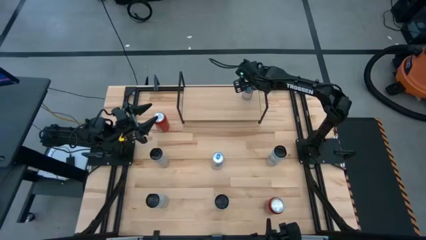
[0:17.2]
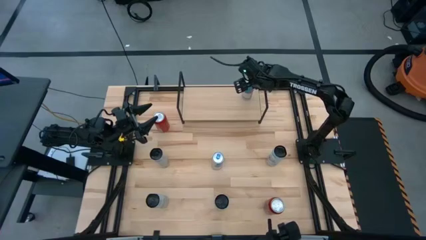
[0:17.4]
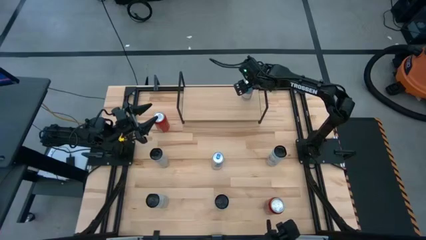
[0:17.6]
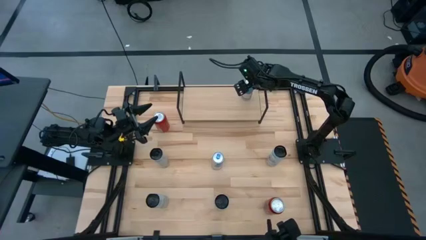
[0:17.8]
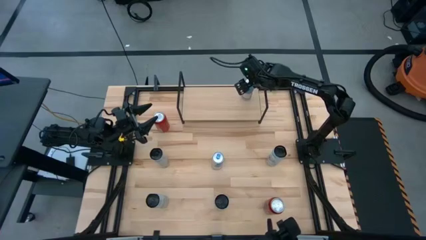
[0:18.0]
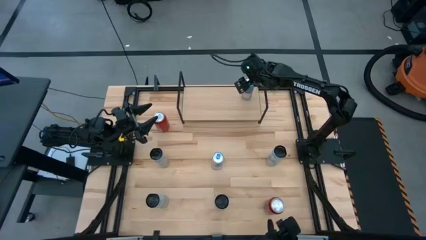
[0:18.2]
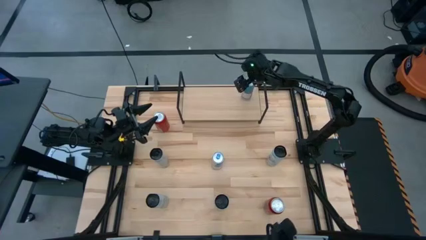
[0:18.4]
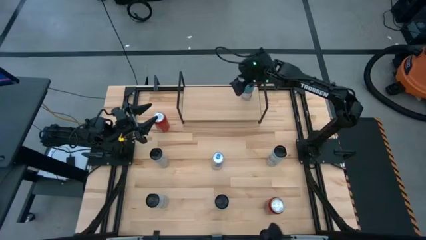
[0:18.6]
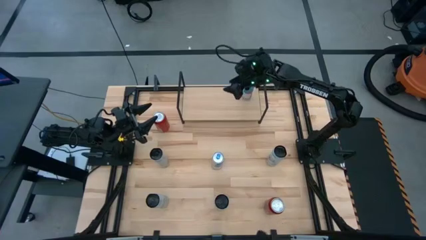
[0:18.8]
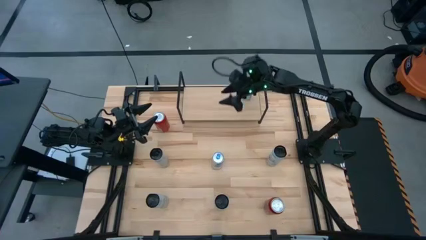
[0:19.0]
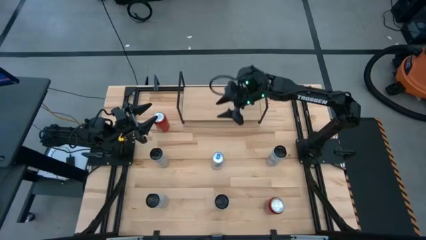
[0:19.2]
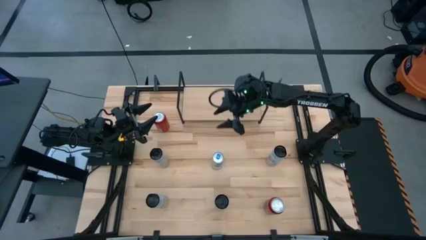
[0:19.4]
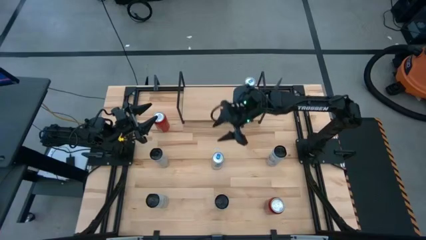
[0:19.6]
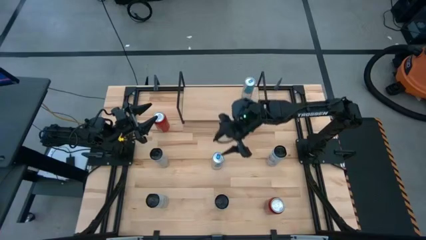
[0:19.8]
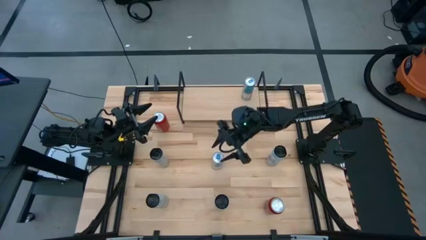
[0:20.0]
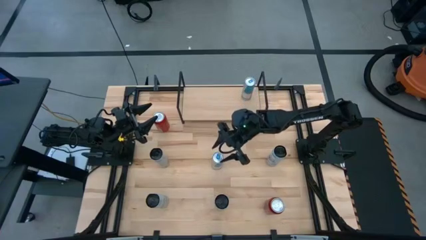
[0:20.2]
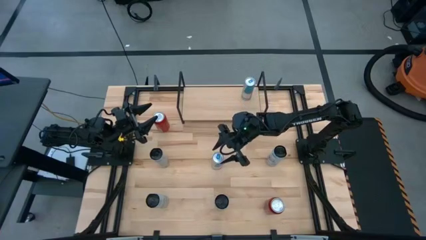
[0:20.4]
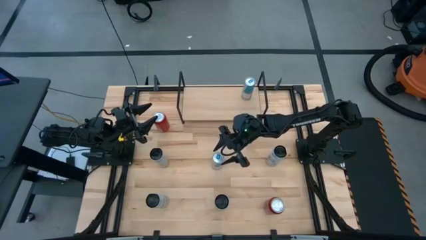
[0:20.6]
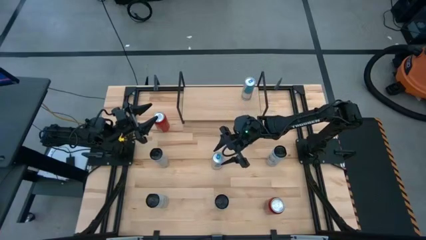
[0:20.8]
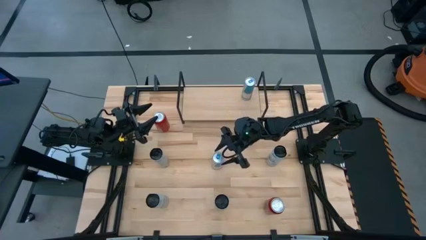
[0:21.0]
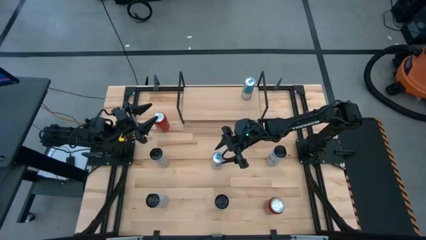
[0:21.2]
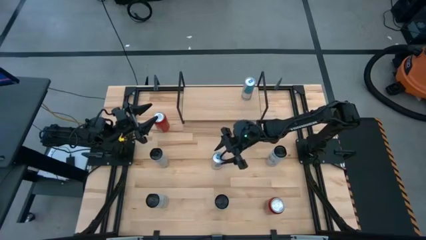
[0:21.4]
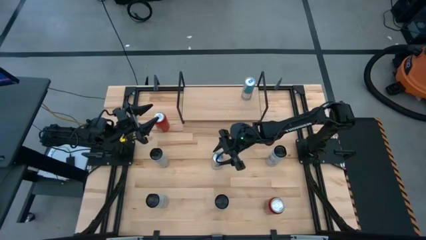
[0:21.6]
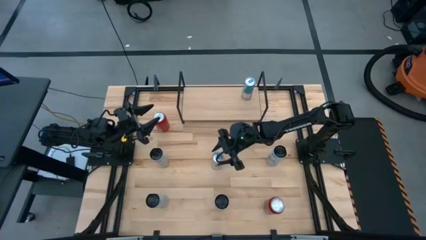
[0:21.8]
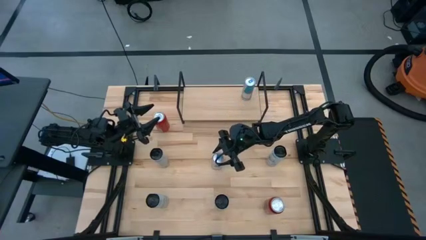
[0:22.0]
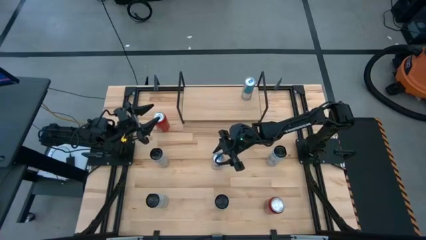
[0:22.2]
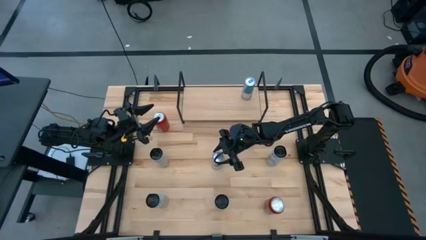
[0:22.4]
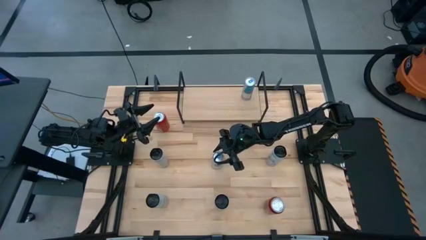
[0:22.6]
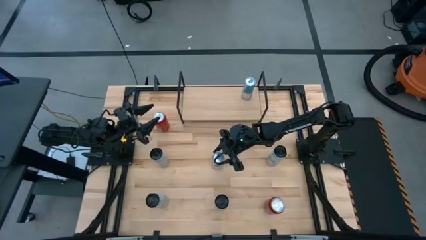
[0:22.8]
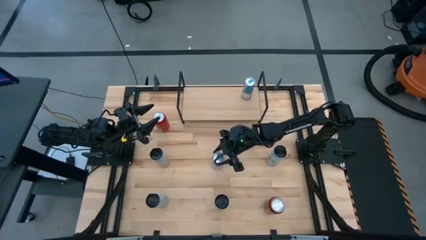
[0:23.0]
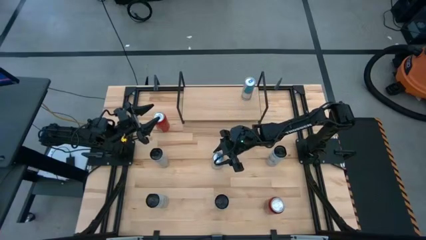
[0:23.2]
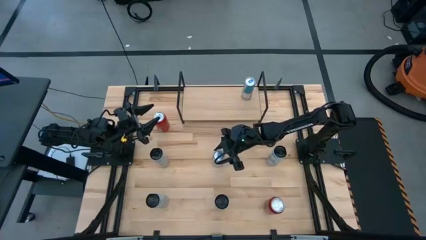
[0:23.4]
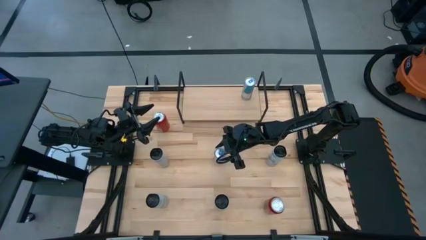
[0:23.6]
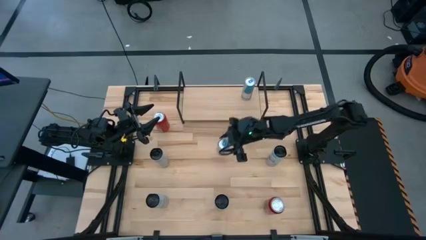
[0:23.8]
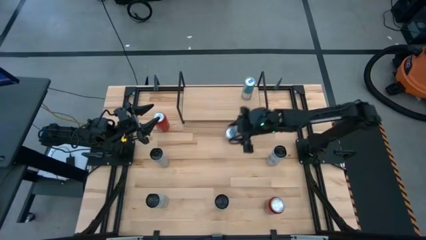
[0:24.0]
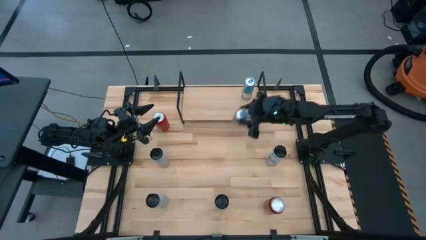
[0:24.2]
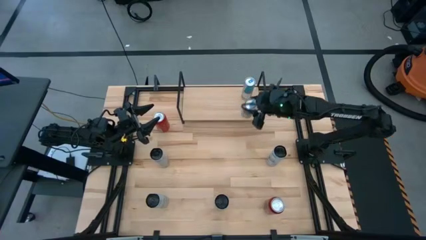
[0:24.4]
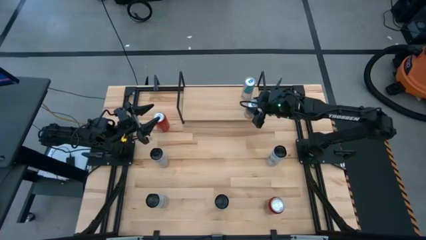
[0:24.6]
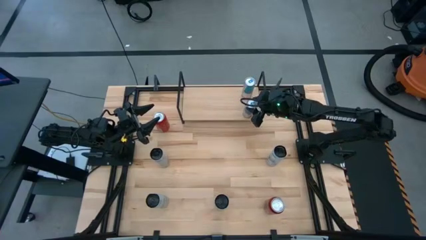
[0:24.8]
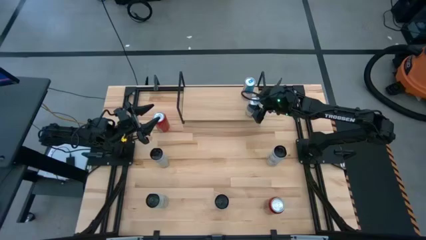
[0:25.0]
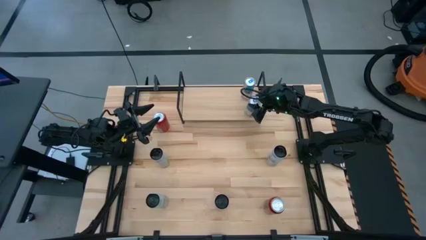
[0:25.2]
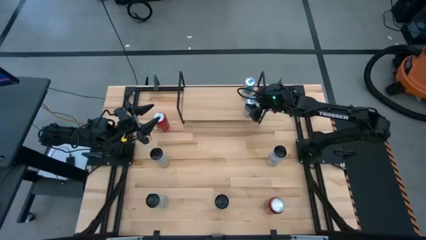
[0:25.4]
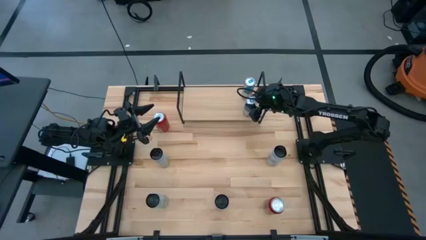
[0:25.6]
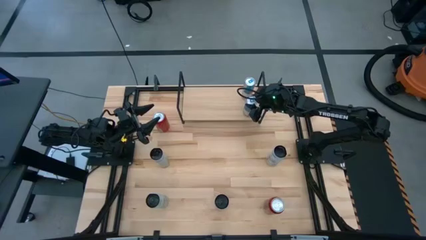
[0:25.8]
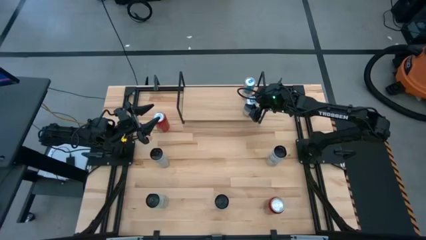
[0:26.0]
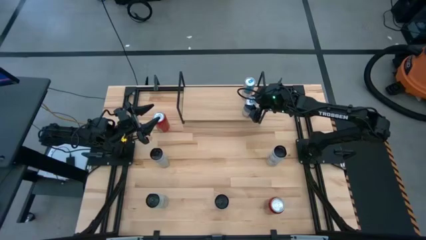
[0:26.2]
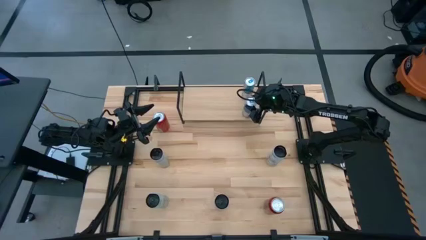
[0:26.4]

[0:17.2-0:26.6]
Task: Place canned beverage on shelf
Put the light blue soda can on the shelf

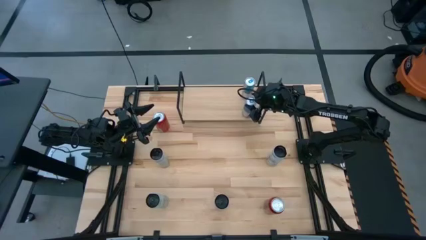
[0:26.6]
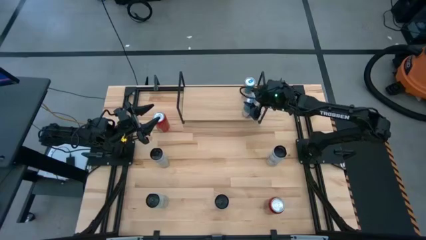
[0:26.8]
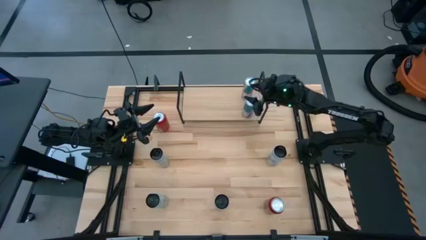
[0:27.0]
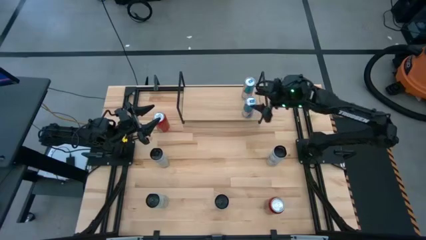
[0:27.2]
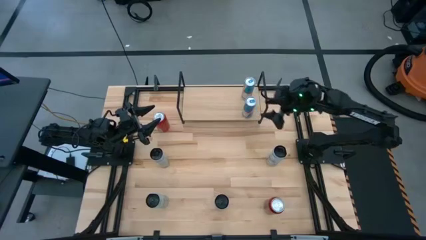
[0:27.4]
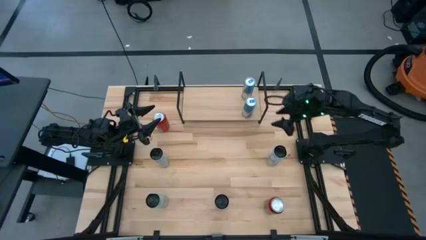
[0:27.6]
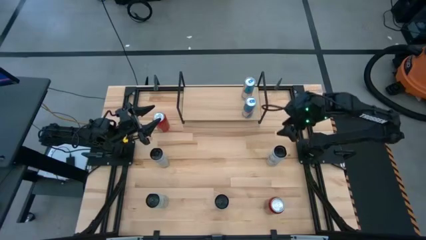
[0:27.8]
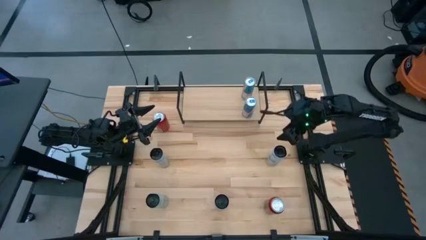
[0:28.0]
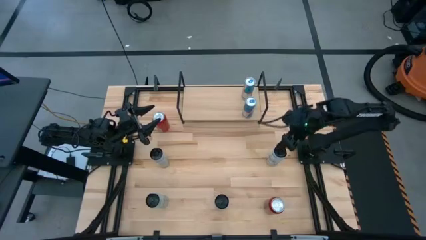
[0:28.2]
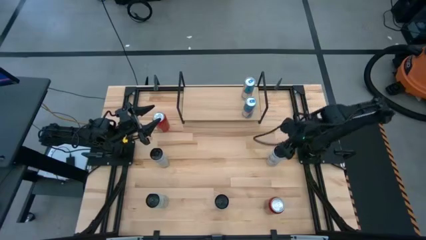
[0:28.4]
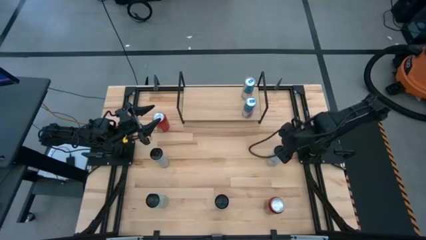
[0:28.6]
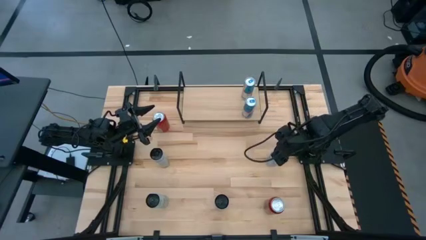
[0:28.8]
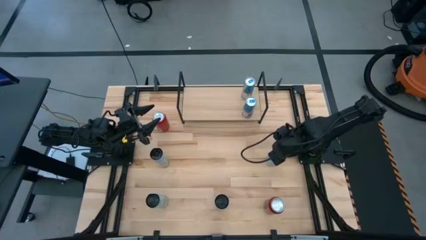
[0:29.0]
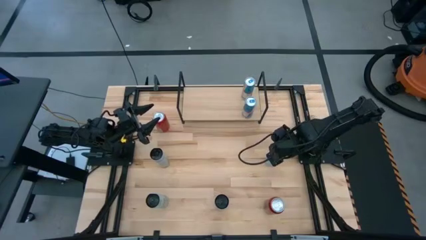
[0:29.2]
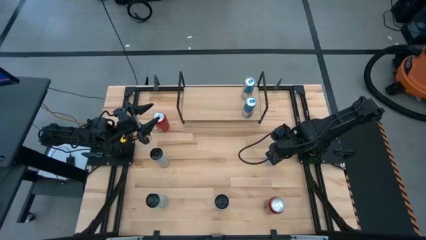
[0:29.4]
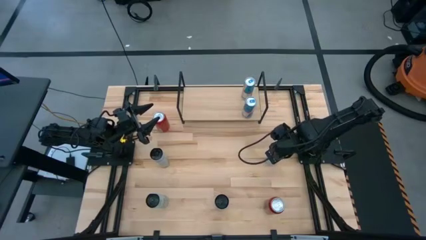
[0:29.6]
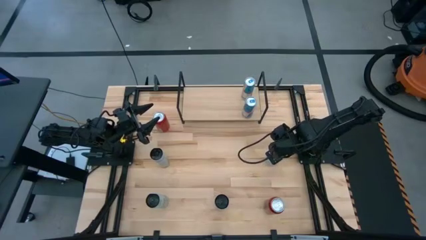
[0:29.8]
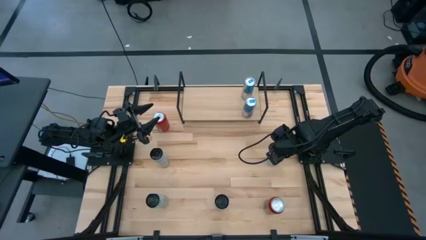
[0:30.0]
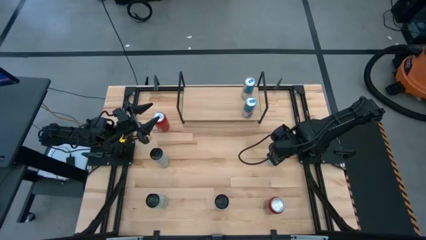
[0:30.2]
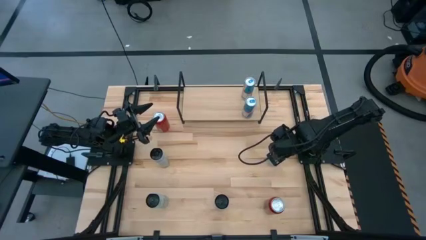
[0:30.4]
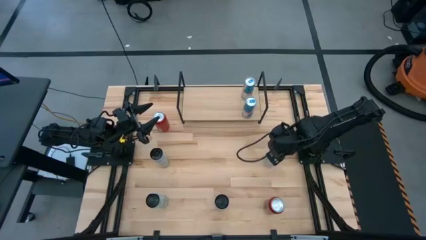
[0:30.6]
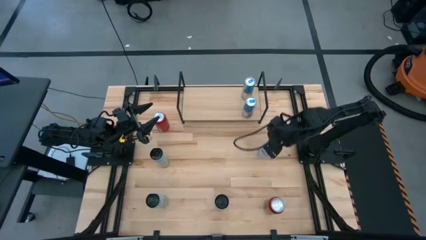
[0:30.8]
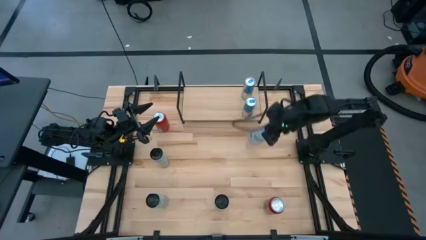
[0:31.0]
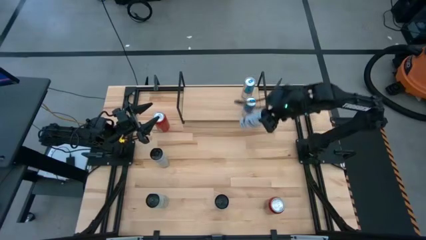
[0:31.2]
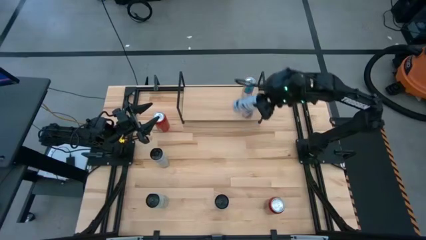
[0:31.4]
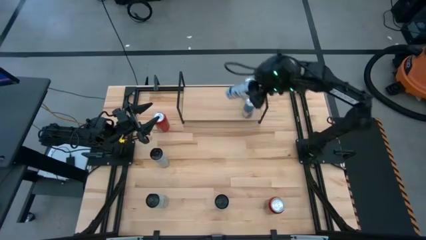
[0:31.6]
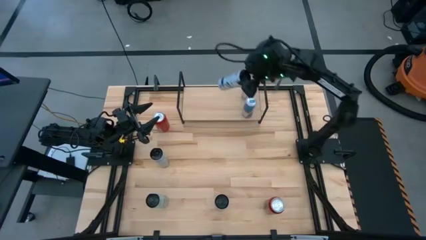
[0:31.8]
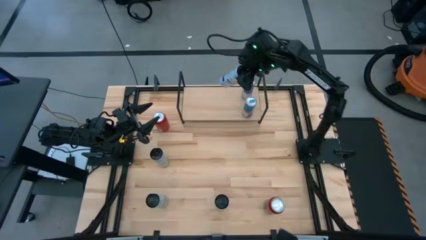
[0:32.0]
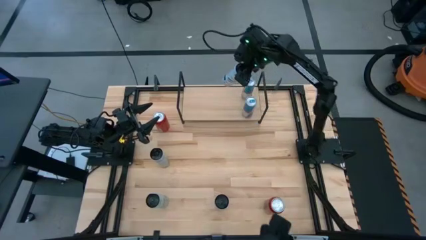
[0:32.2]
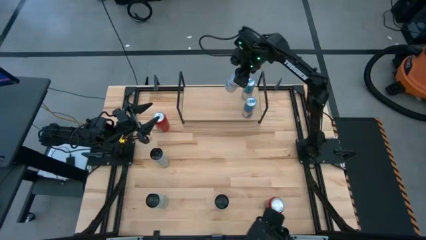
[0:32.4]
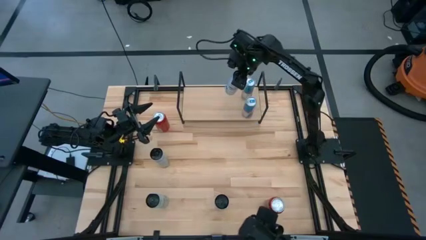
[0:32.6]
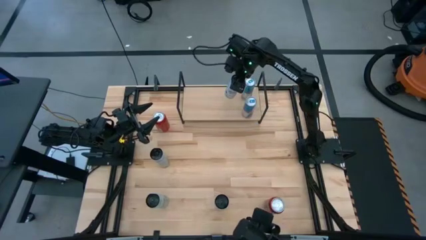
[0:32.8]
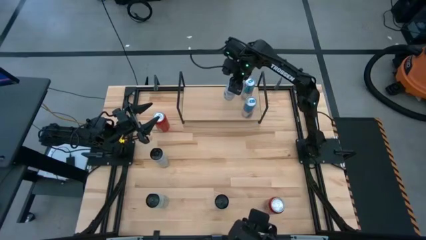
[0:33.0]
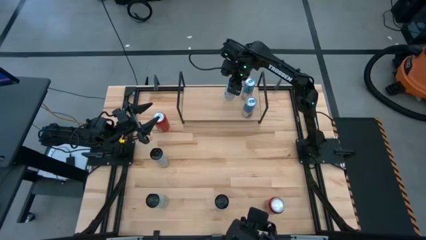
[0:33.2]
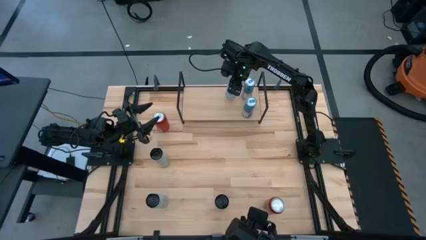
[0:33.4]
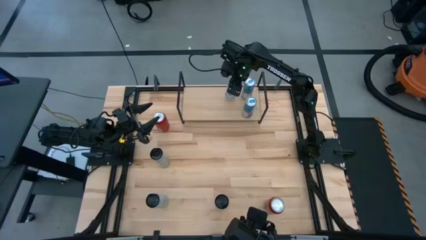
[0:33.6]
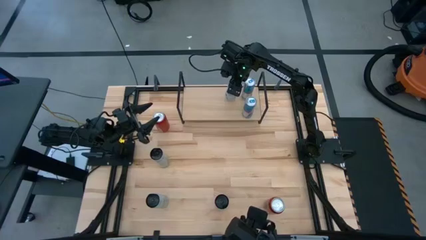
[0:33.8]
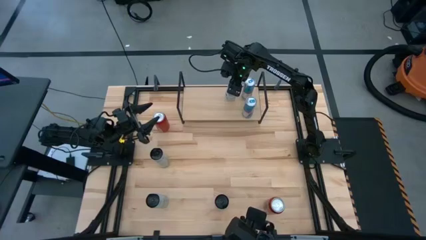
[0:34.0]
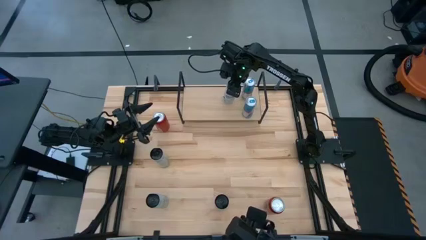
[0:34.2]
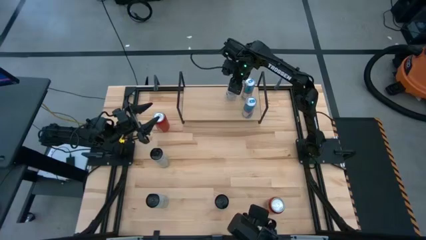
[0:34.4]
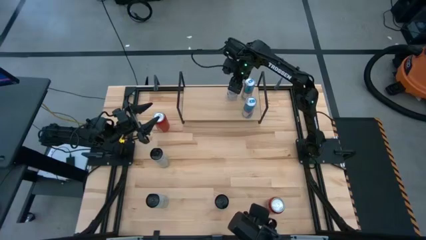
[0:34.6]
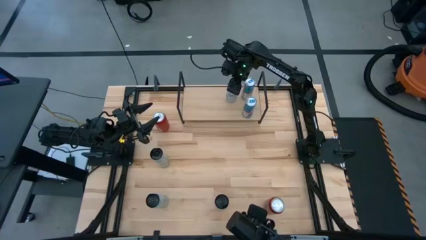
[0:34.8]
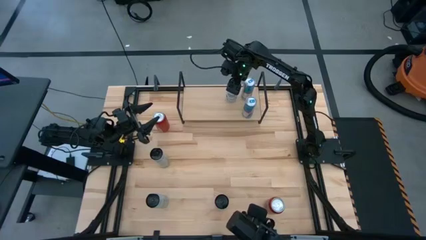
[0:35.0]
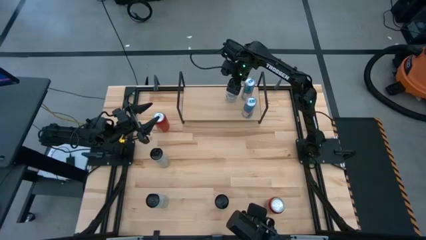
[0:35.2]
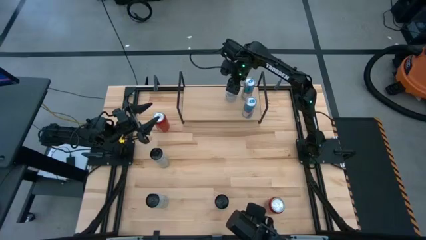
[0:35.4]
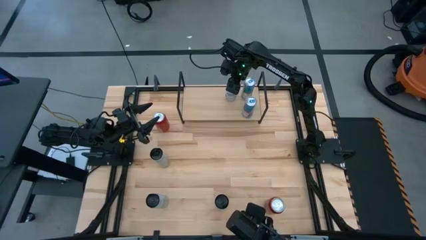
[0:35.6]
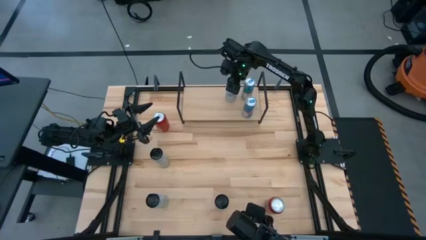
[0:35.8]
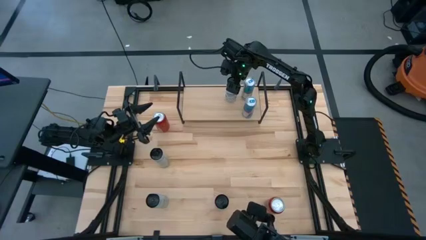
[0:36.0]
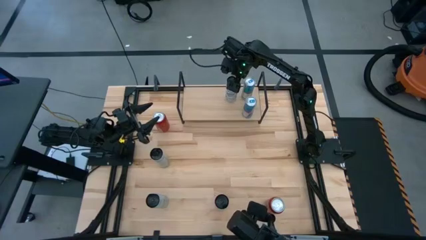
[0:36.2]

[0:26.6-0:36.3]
Put the top right black soda can on the shelf aligned with the other light blue soda
